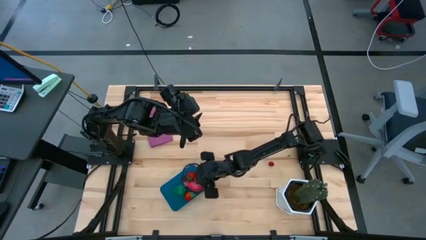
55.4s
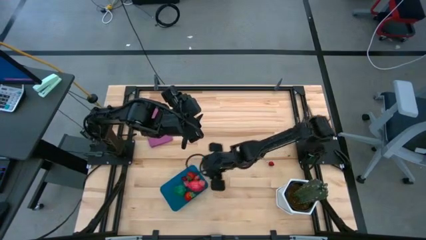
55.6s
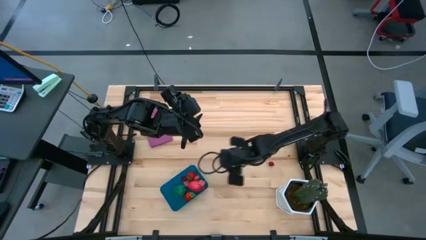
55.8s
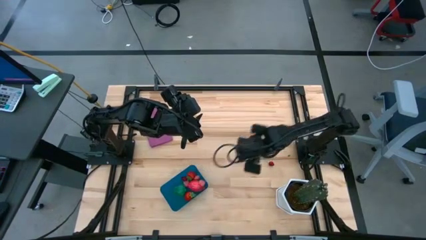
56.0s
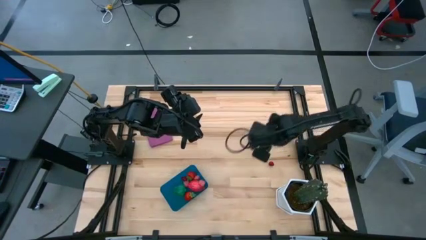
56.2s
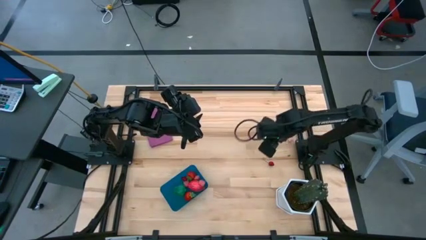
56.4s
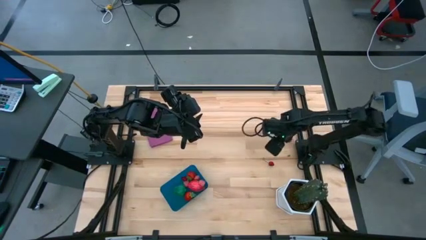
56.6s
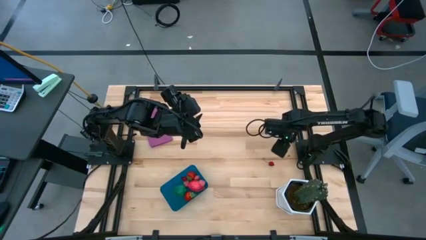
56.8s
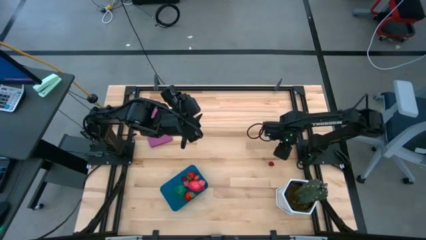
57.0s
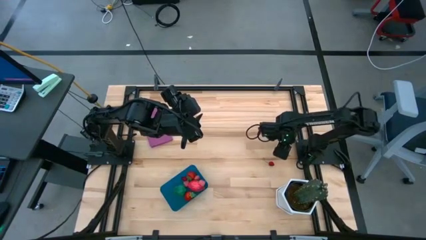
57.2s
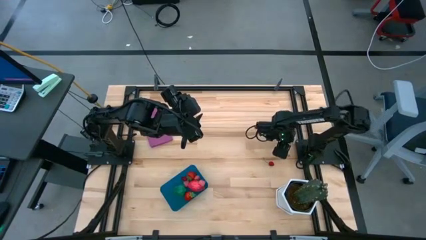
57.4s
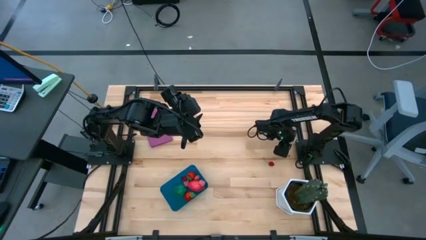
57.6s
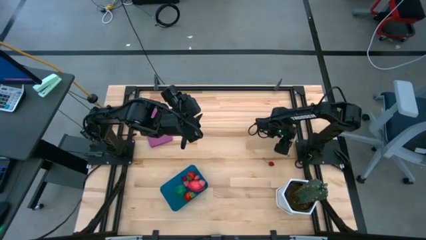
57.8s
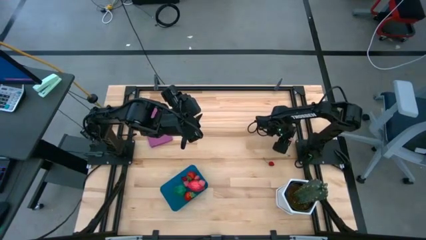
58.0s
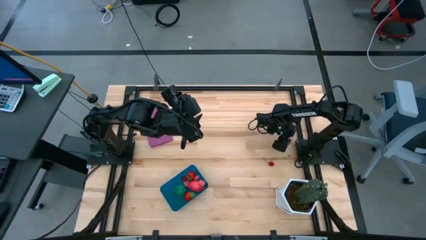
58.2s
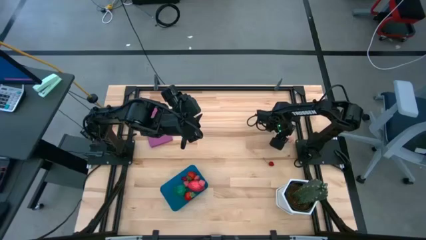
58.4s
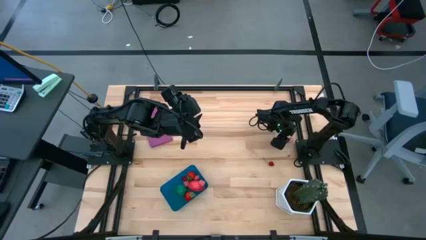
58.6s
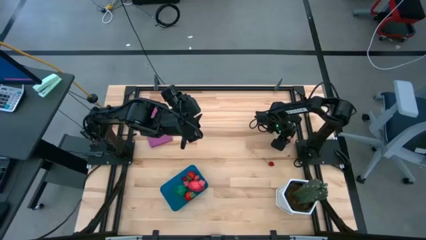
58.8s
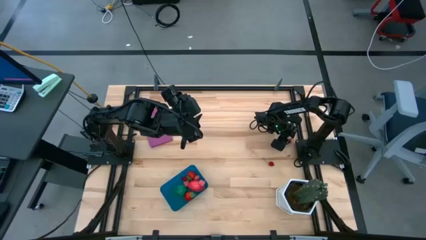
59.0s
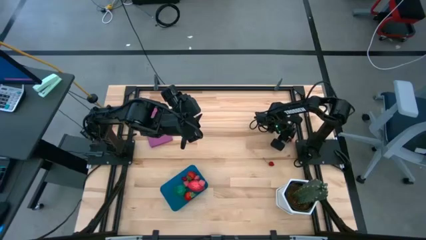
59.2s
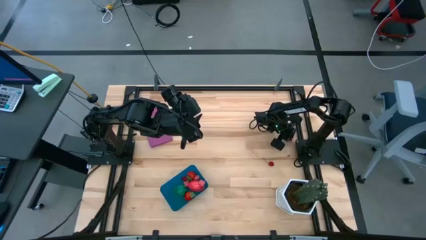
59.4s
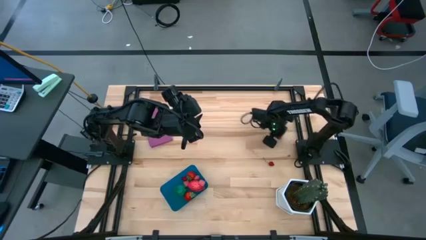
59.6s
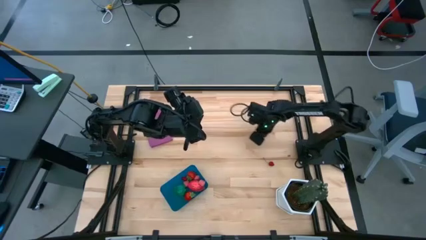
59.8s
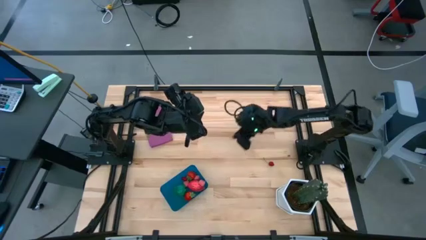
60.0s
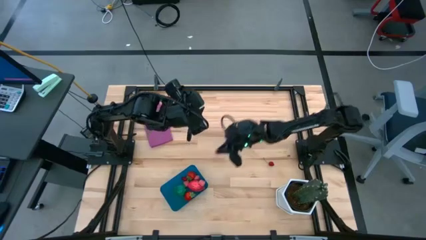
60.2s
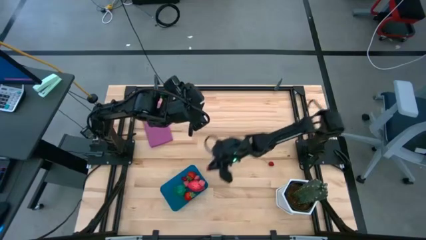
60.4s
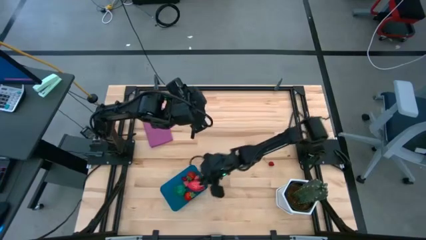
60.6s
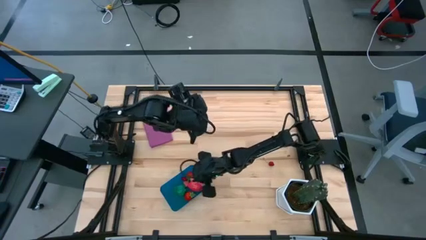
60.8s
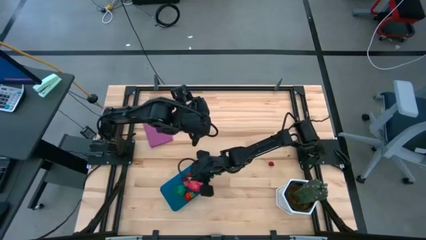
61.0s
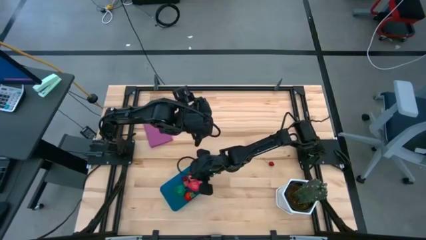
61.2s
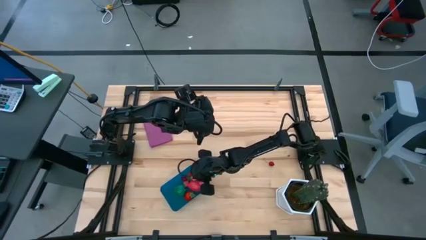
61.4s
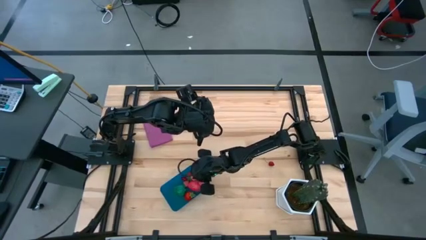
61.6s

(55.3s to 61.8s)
Task: Pick and placing Produce into tupperware
Put the peach into the blue bin

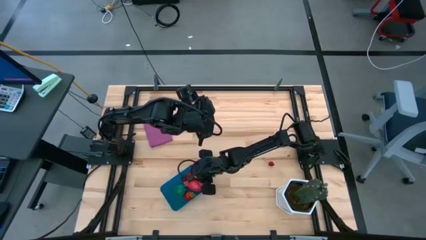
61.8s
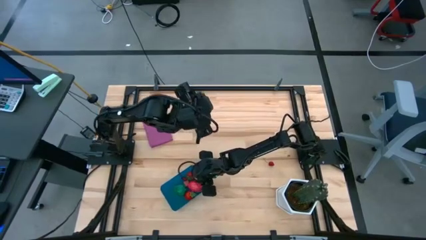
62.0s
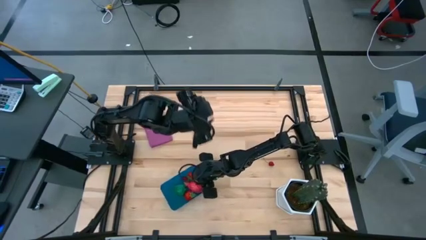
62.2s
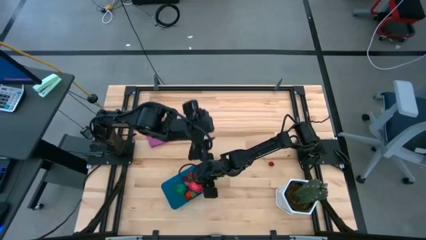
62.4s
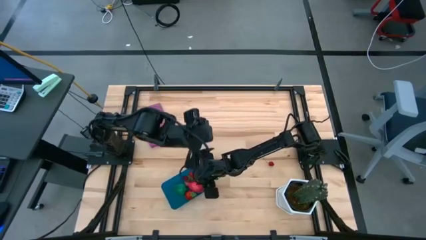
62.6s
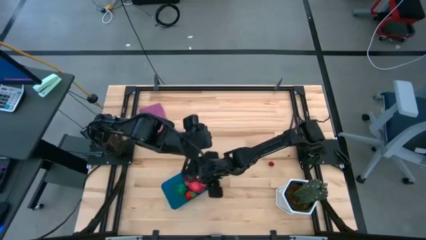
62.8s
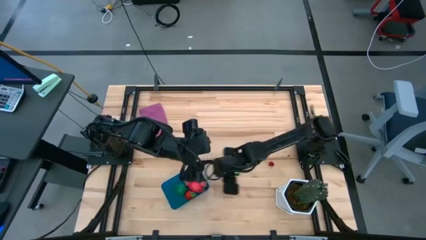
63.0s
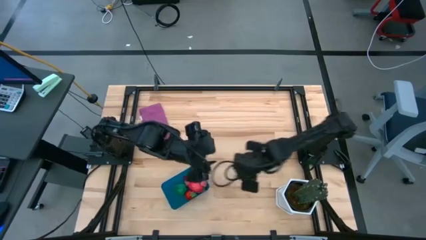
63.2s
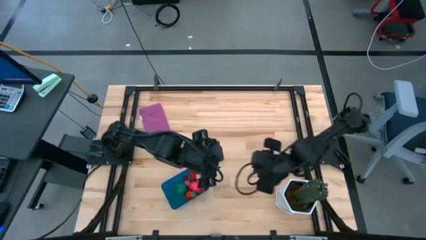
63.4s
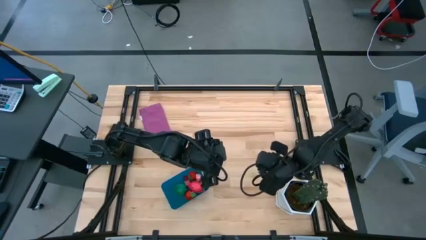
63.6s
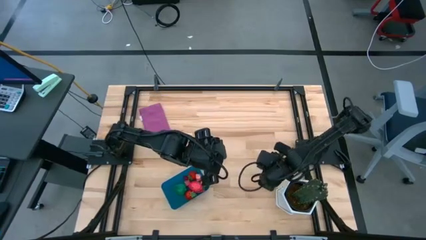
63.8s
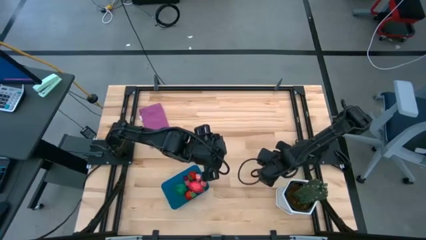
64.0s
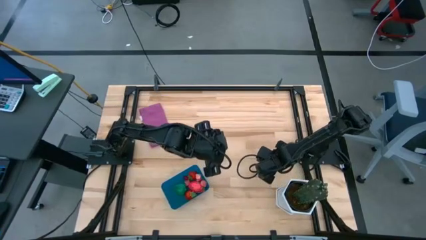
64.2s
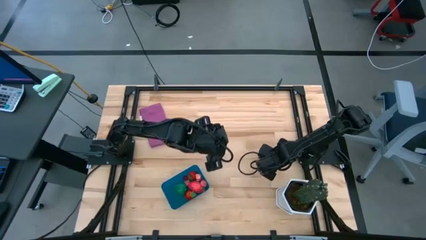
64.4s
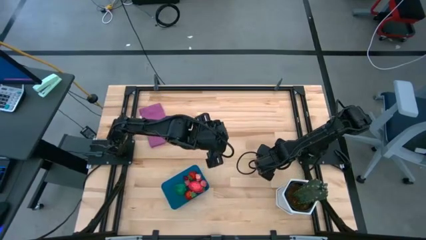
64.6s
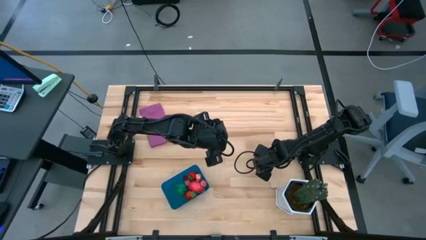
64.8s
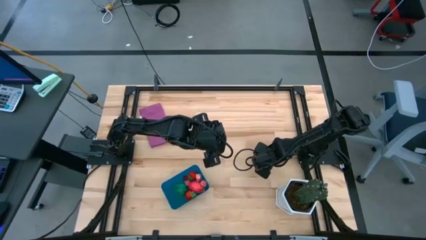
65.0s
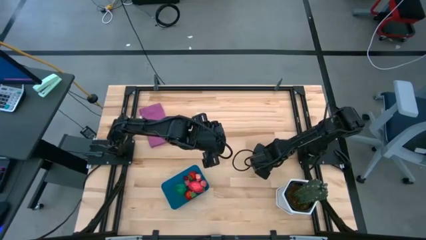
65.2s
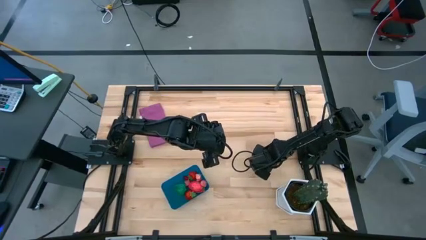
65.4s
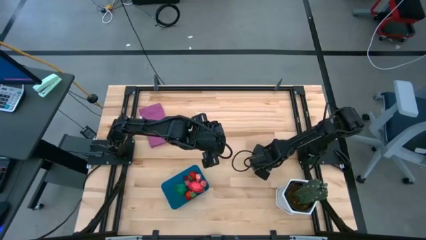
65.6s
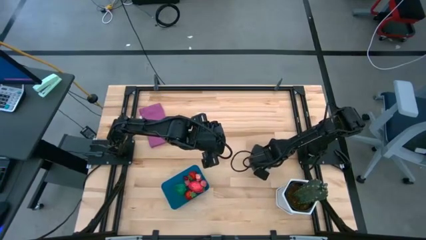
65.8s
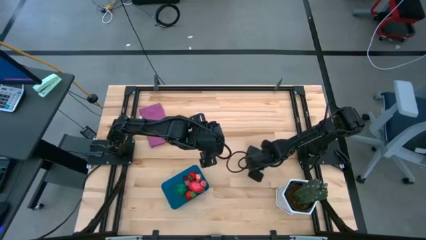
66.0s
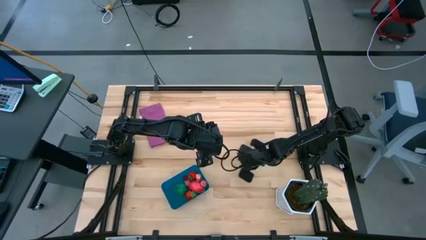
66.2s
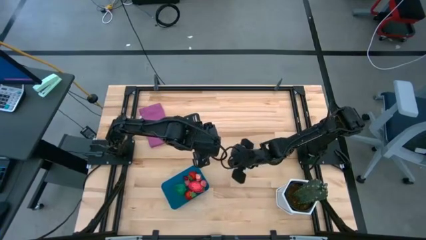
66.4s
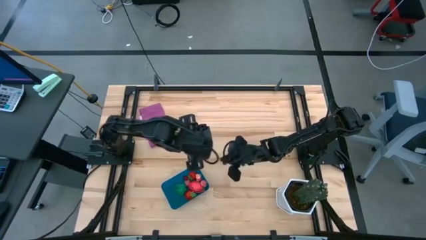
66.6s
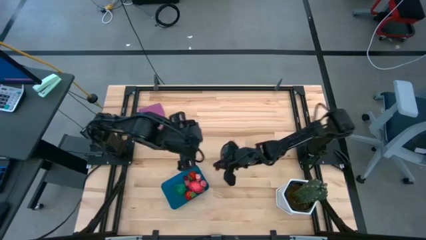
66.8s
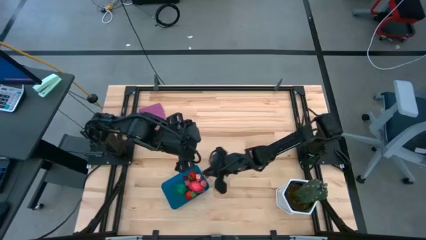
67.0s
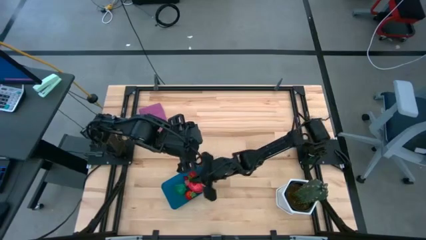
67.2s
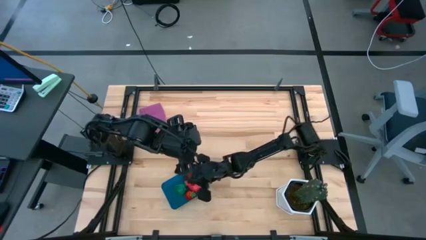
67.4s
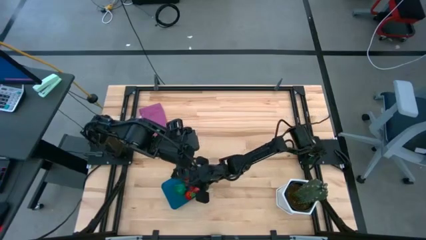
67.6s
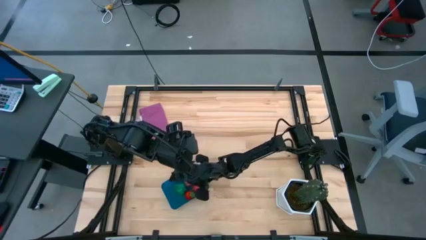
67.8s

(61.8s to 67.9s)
Put the cherry into the blue bin

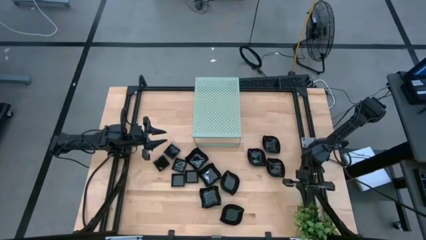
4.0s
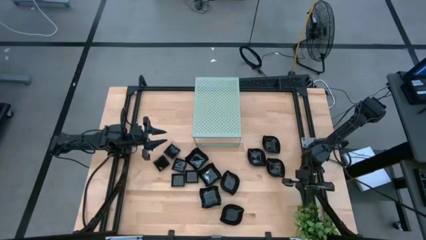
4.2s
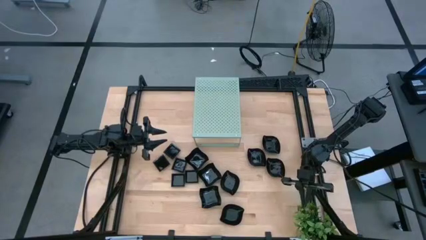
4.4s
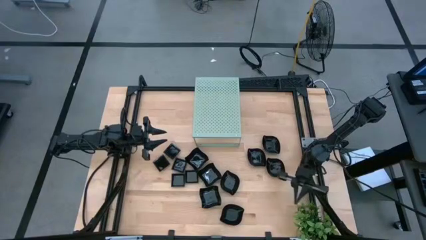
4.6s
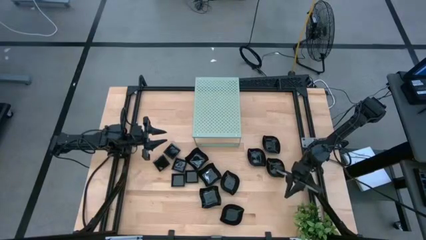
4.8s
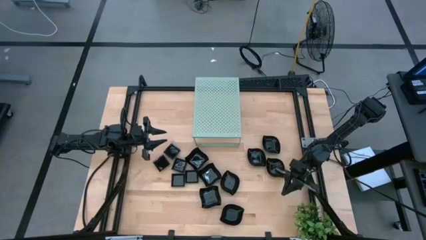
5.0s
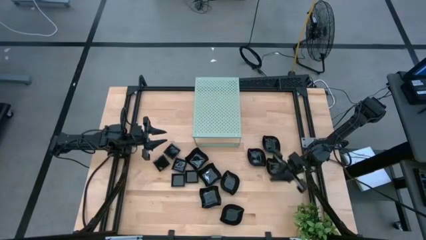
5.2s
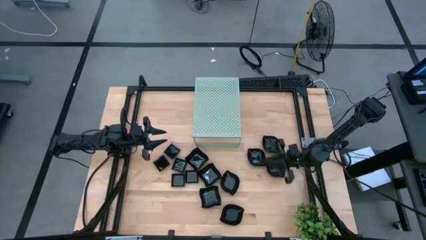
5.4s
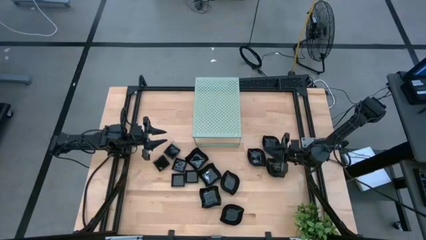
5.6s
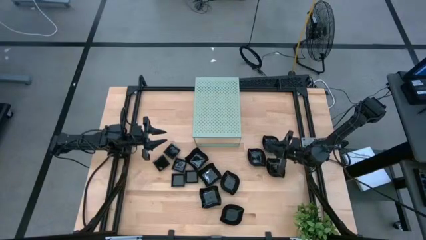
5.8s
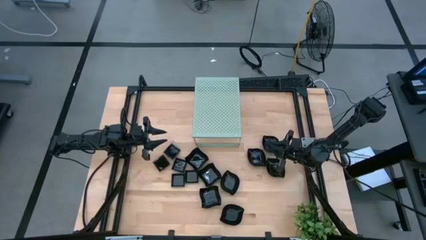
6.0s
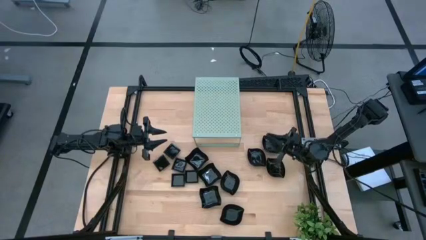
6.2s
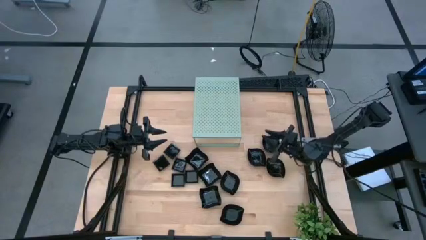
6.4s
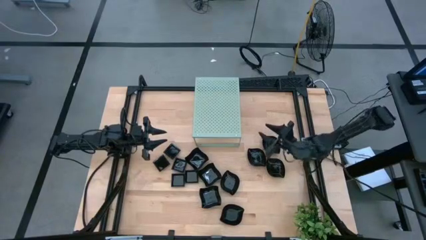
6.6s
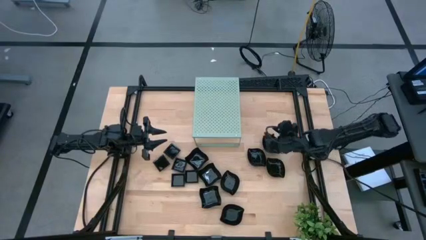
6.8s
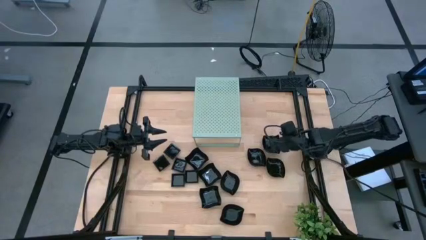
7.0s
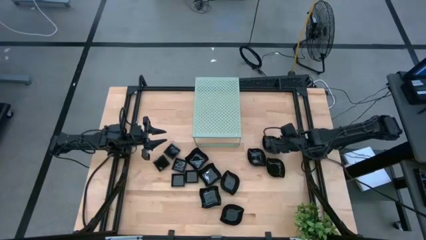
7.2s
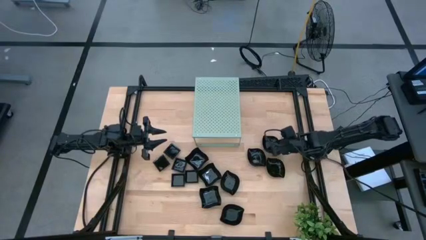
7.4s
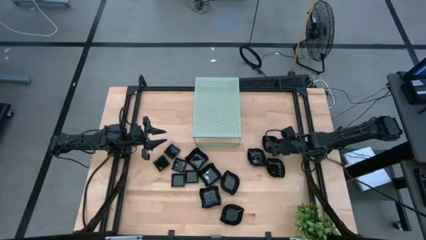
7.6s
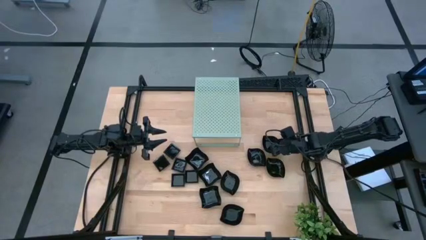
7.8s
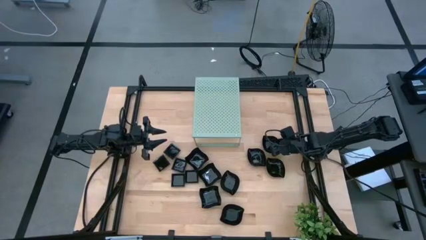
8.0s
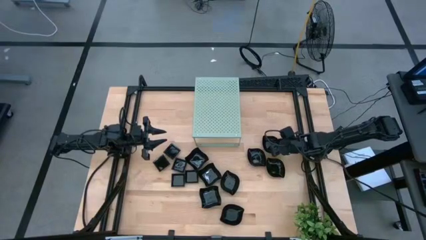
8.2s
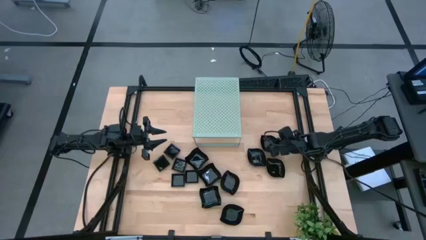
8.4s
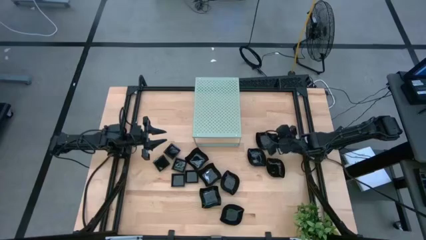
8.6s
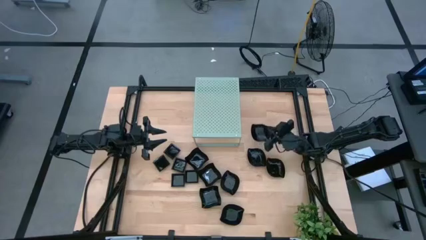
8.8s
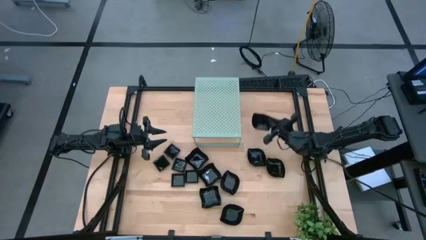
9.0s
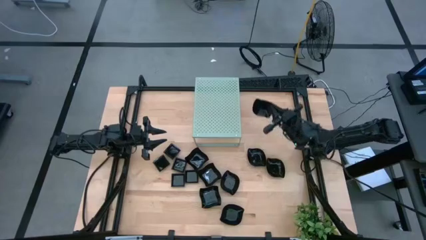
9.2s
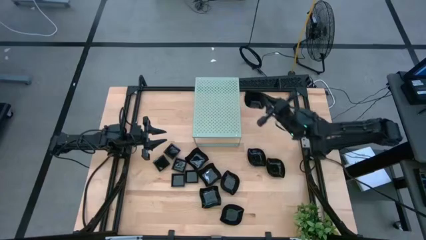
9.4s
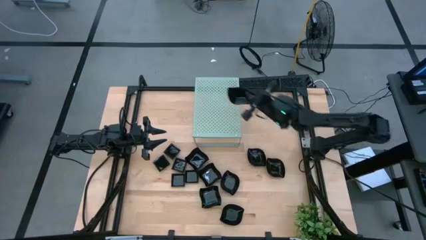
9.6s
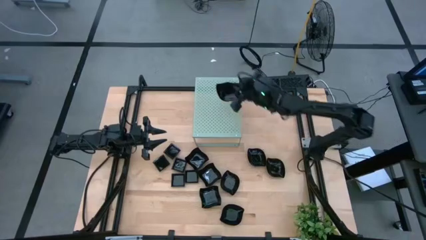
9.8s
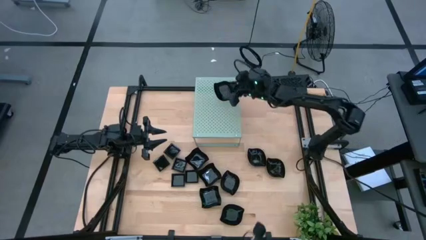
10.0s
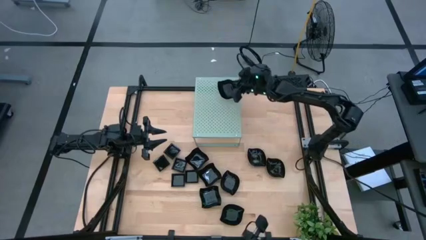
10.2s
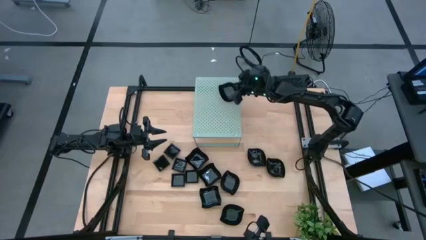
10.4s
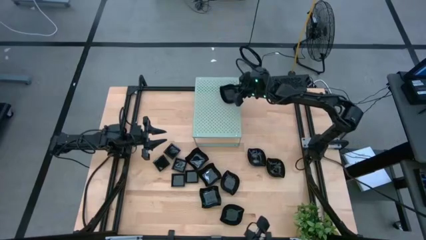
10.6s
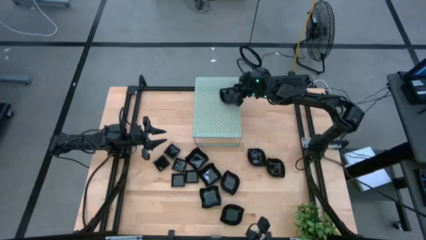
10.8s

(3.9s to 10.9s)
Task: Pick & Place Mini shaped plates
Put the black leaf-shaped plate on the shelf
